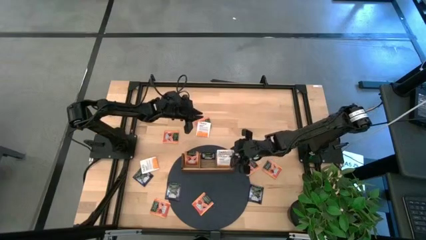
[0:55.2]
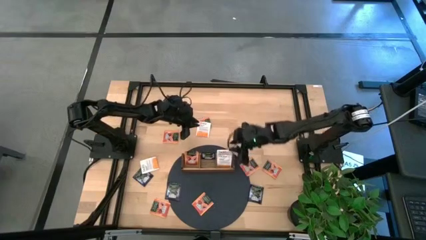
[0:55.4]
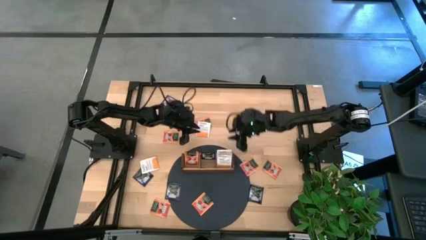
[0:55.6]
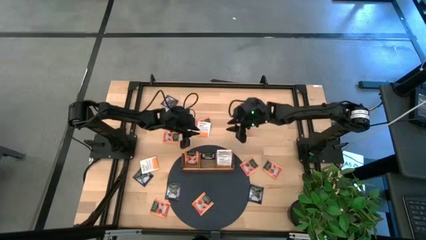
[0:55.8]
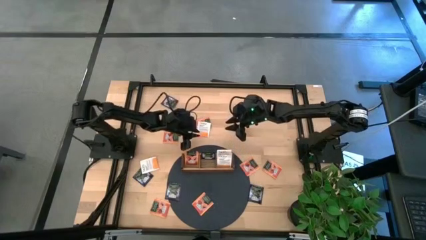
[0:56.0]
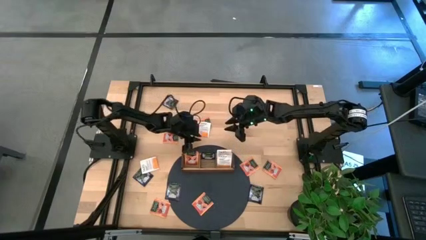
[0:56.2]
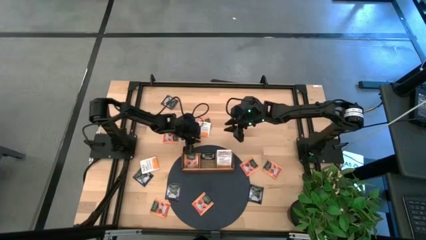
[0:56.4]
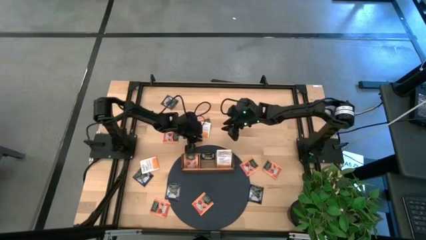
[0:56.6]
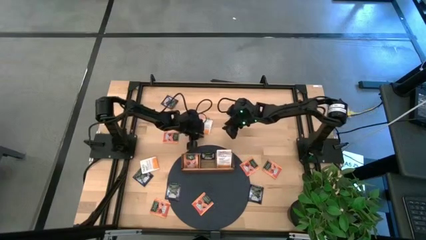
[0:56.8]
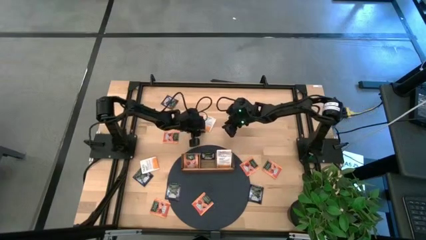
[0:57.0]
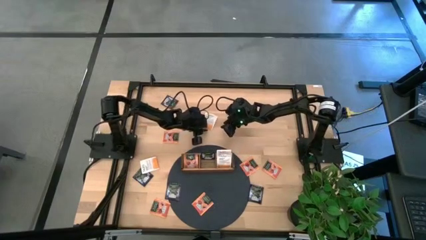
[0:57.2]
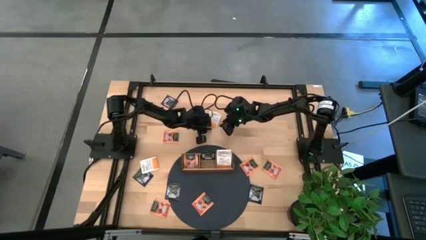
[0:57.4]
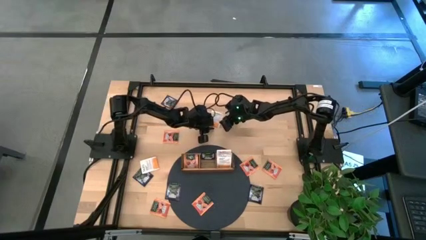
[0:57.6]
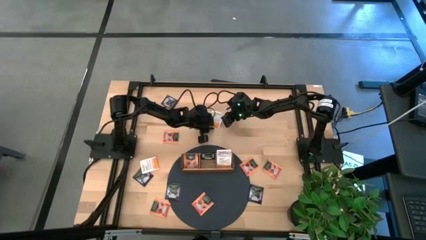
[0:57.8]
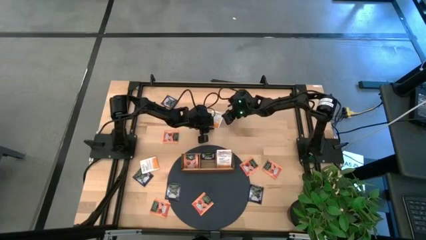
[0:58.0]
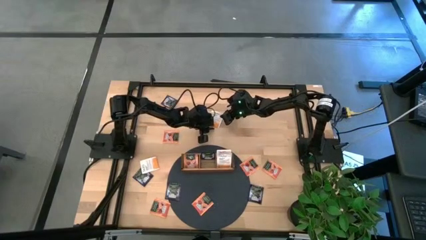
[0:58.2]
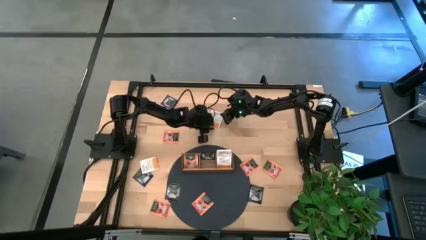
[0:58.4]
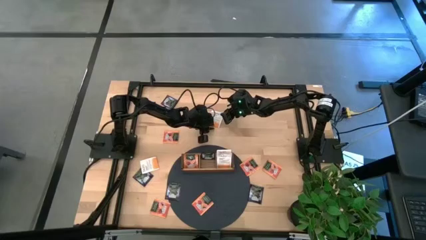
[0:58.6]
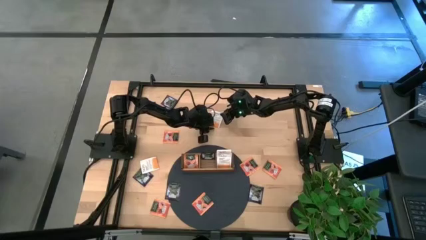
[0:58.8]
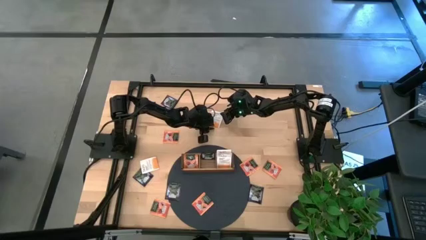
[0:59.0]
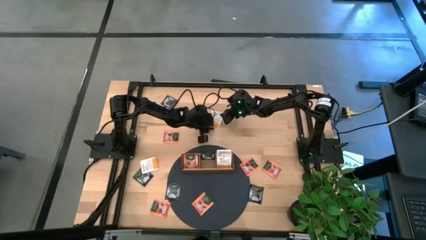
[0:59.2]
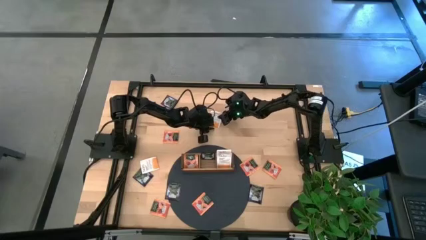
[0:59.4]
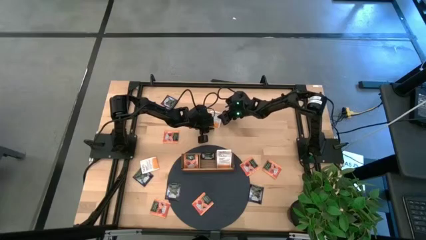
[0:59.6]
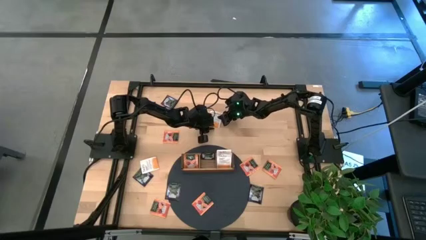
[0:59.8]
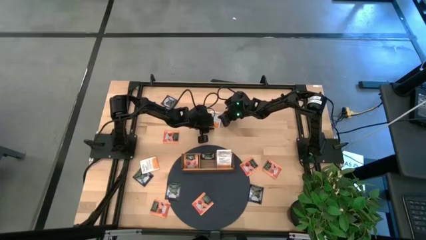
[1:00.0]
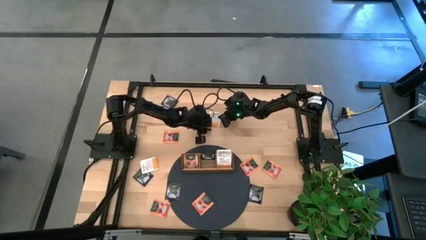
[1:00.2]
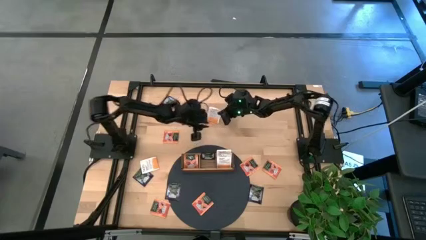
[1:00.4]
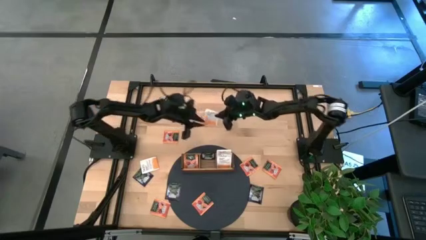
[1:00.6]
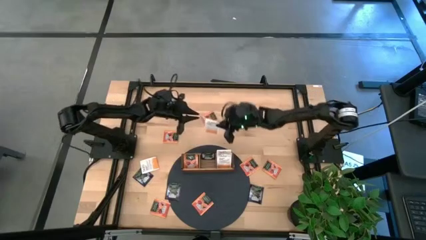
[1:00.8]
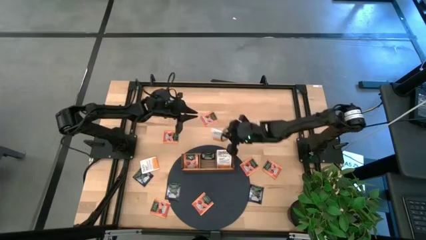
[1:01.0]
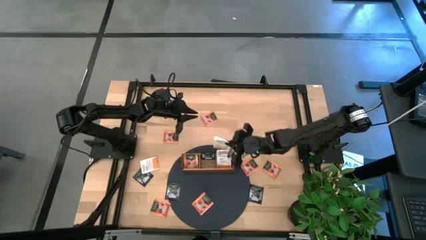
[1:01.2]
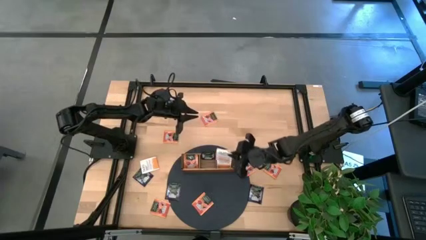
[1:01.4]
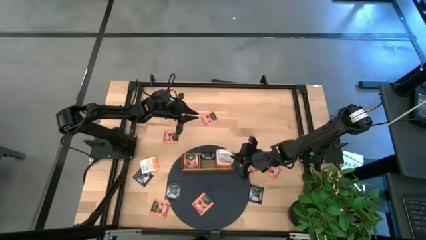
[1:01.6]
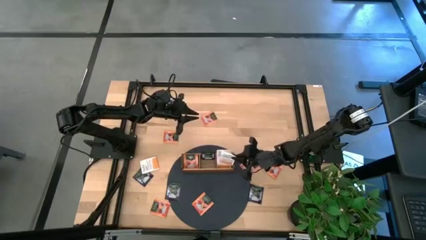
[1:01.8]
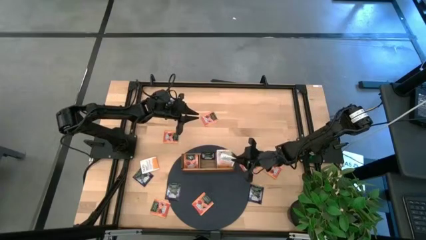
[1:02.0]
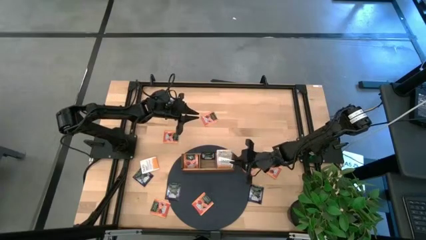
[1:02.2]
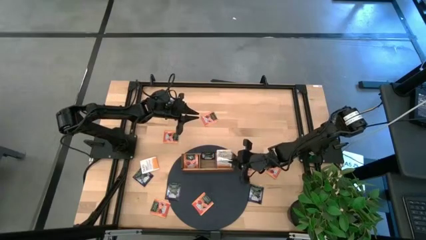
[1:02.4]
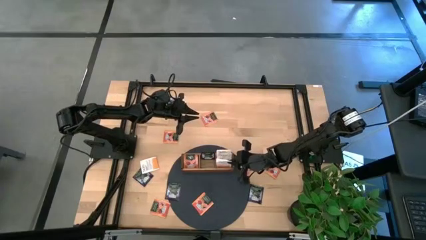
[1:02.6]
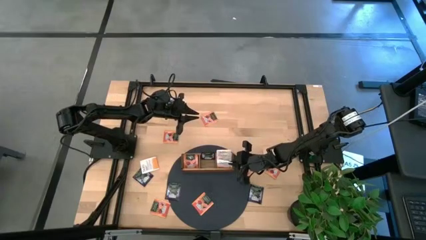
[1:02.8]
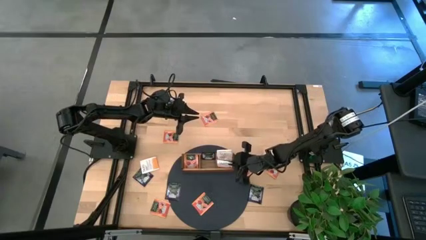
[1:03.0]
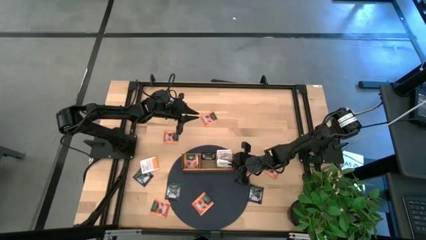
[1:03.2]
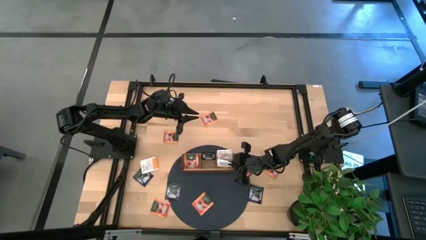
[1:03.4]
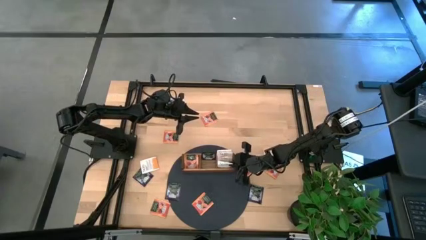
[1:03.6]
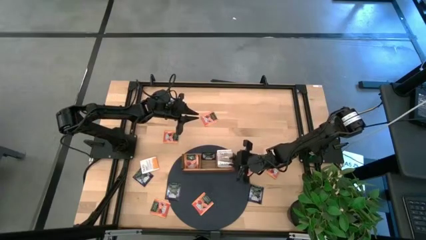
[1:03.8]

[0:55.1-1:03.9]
Task: Pick & Place Tea
Put the white tea bag into the right section of the wooden organizer

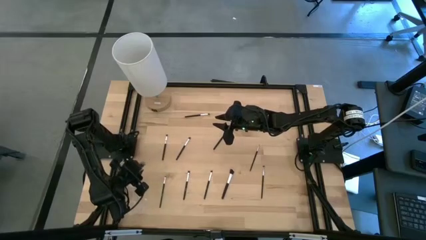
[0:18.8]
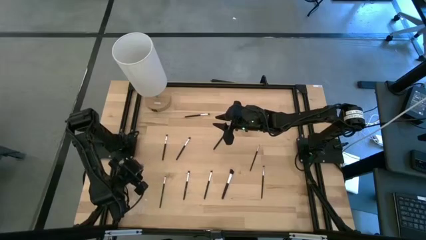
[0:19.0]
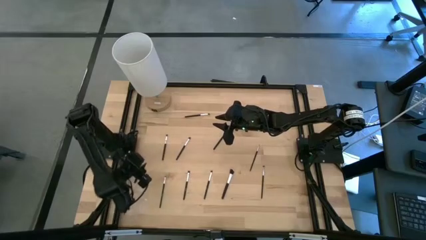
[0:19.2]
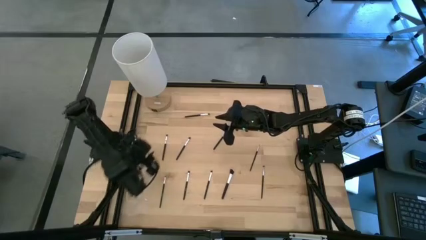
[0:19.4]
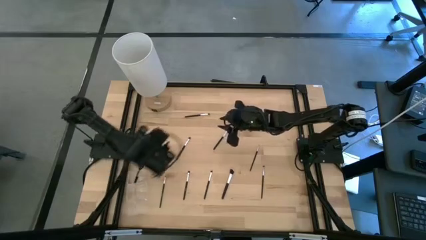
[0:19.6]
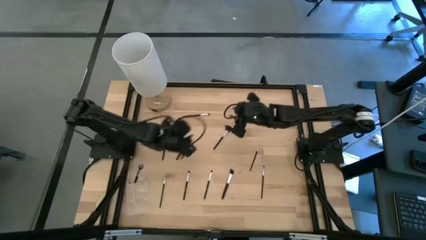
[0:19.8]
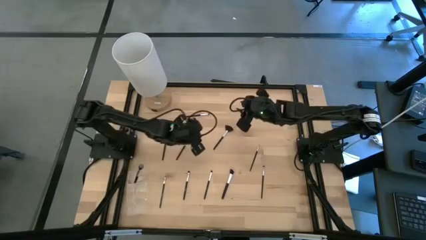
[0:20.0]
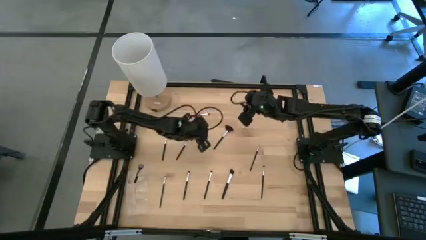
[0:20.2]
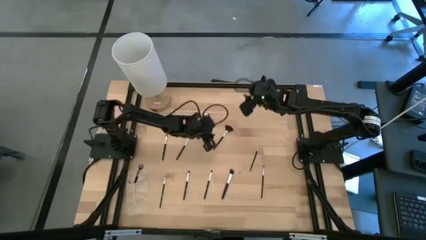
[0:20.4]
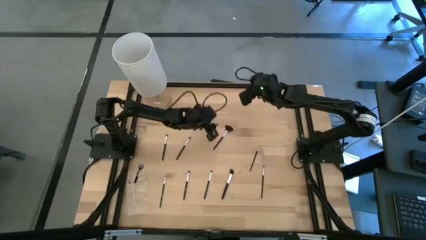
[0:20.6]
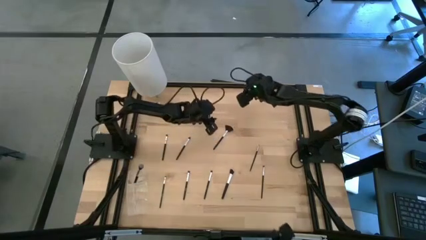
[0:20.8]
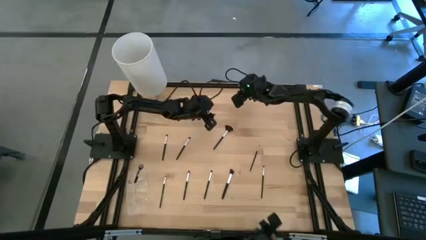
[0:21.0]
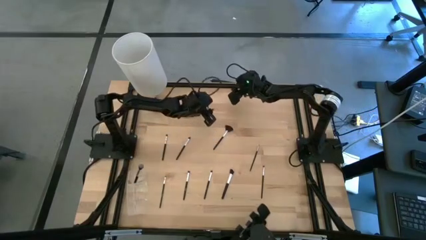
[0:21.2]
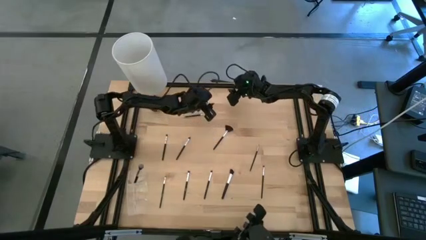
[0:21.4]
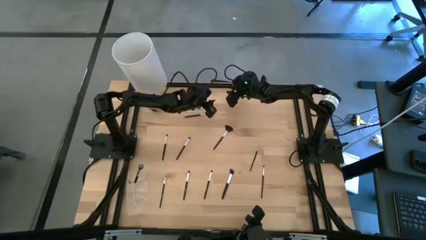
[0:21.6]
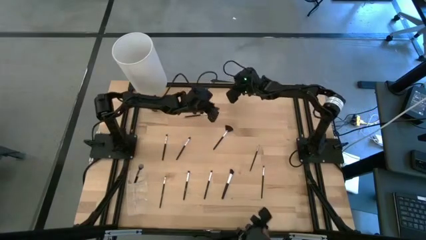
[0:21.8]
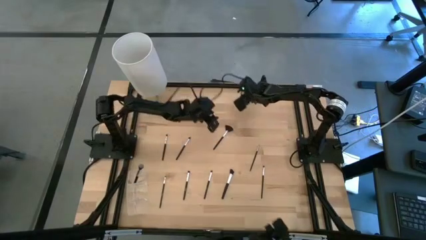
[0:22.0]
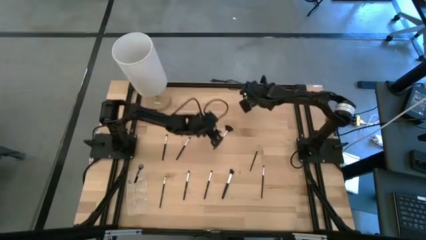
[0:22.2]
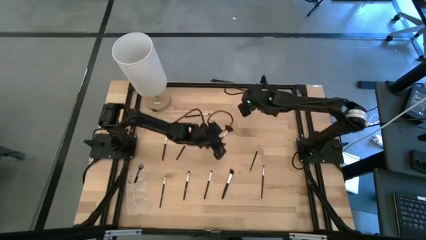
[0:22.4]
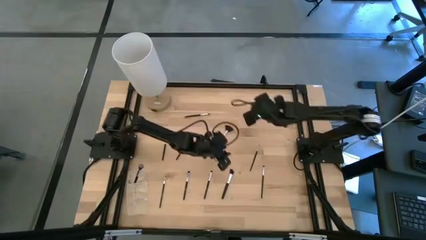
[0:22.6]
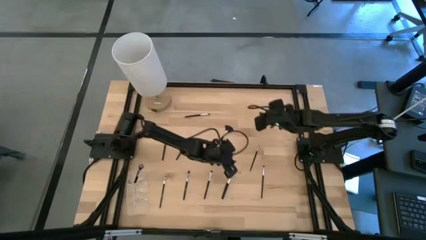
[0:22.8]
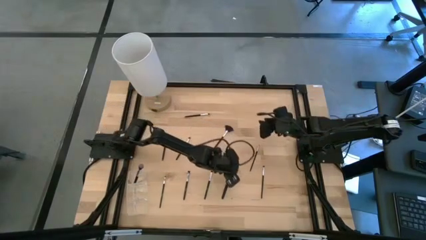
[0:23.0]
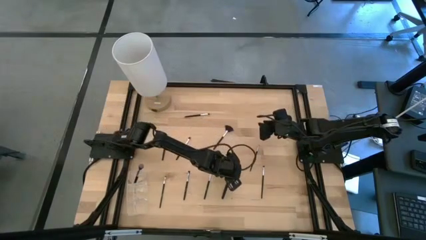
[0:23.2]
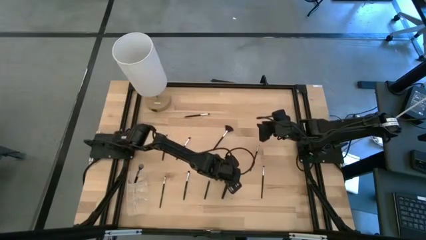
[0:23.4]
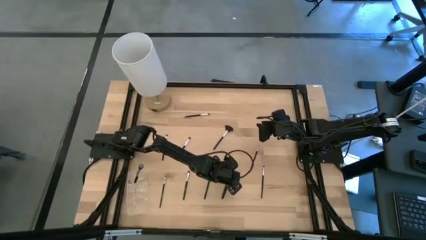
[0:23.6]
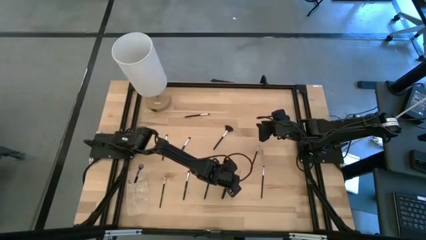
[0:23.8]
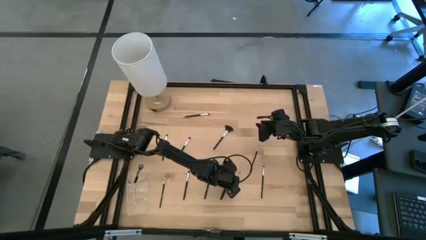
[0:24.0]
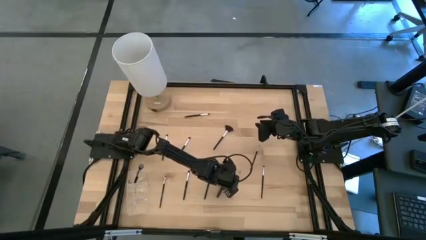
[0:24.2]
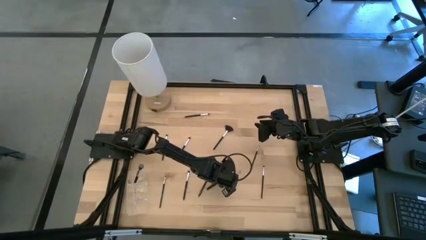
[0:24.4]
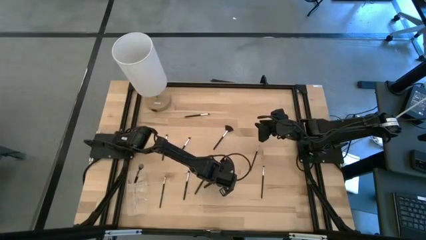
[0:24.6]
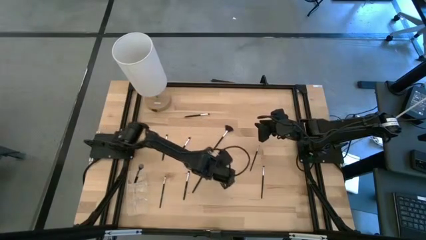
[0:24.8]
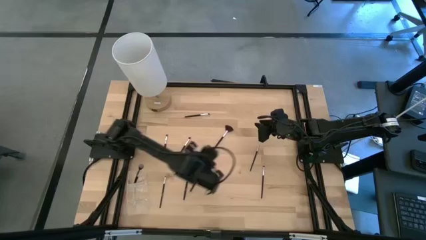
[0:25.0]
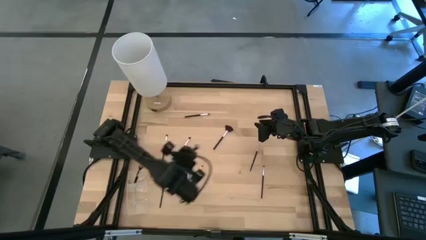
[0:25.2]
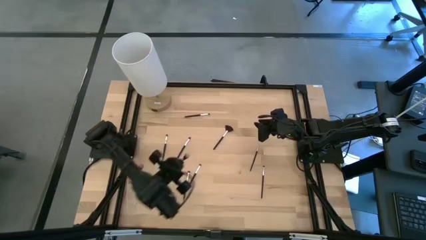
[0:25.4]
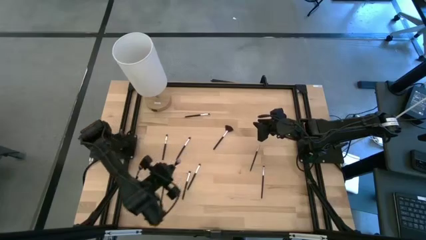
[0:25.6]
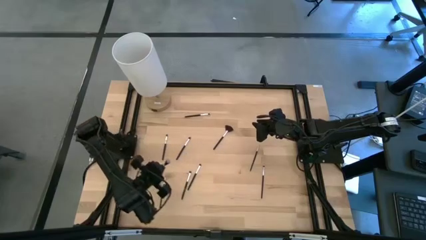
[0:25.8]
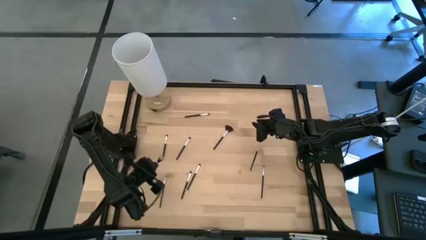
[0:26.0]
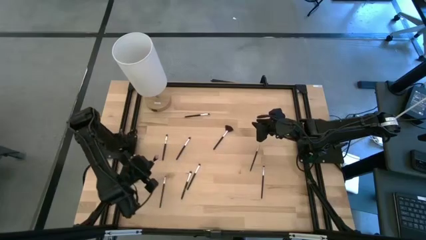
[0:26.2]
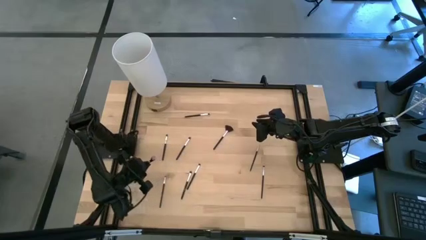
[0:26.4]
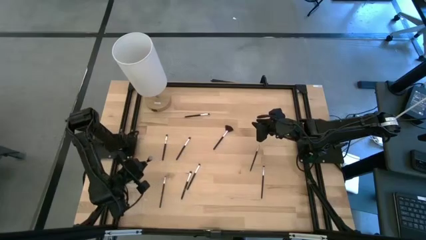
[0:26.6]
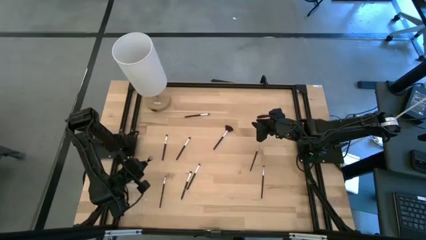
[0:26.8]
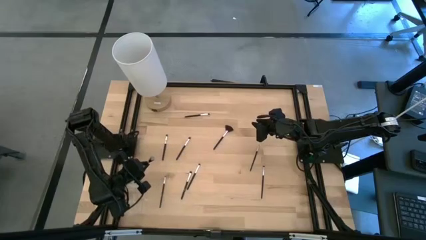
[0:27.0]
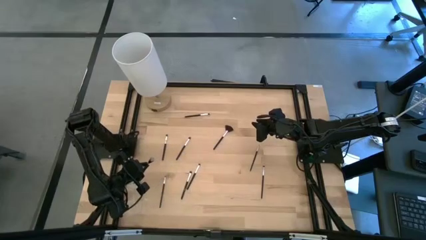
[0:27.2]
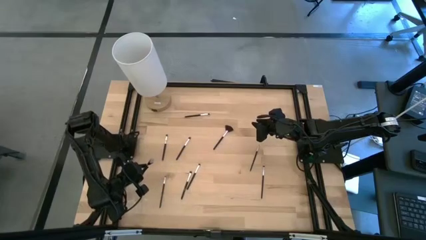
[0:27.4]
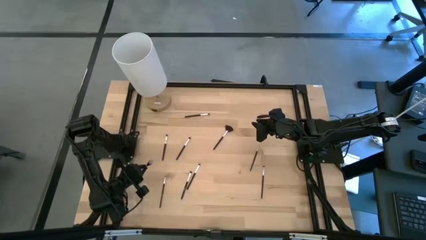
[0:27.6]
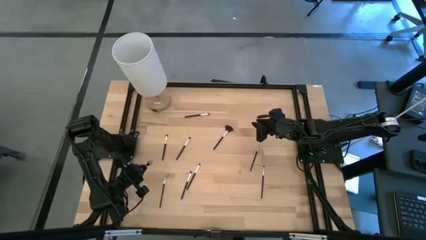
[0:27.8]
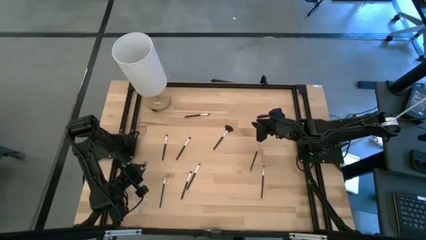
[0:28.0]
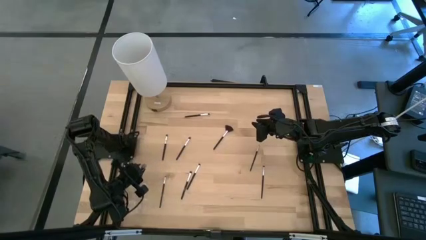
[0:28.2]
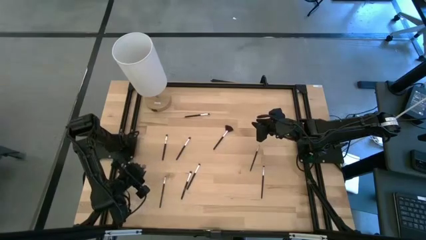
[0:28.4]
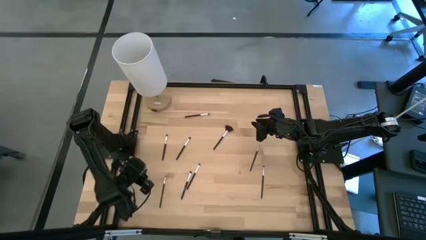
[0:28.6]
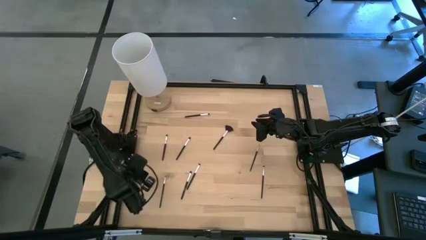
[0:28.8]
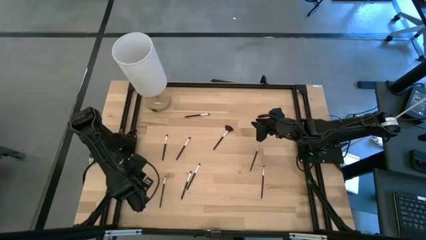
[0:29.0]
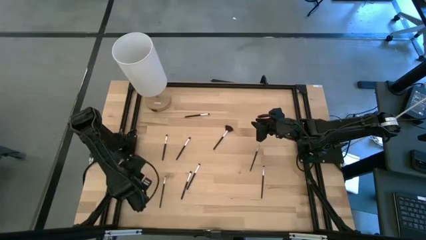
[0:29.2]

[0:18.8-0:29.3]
Task: Pick & Place Makeup Supplies
Put the makeup brush into the transparent organizer
